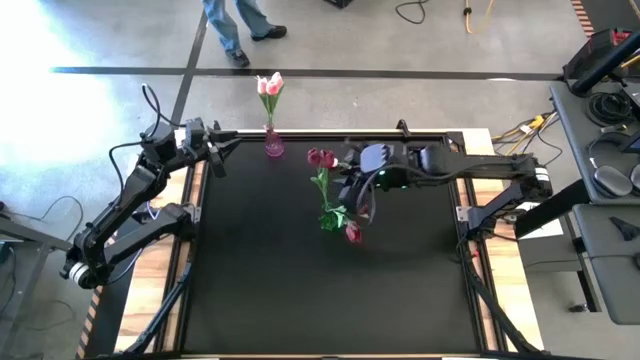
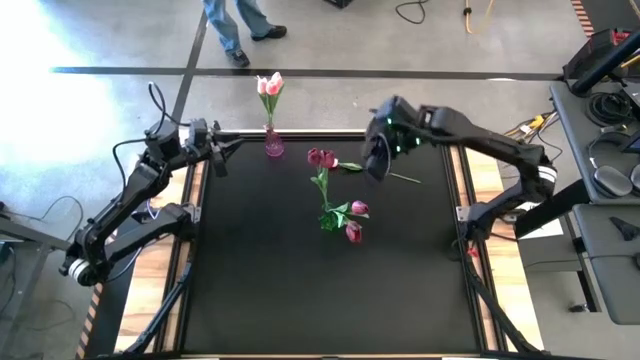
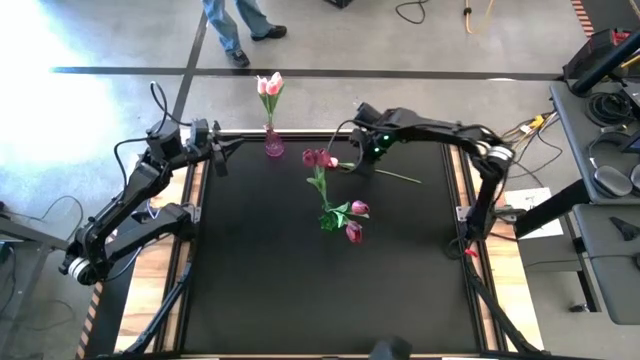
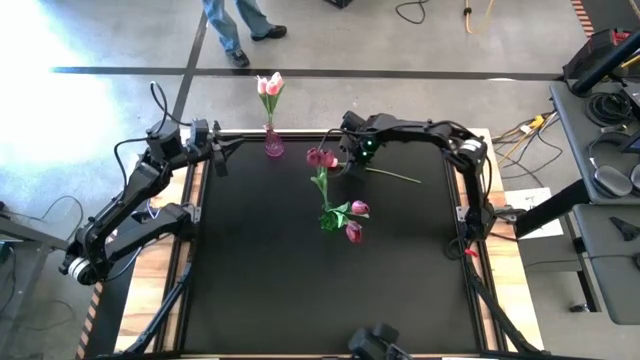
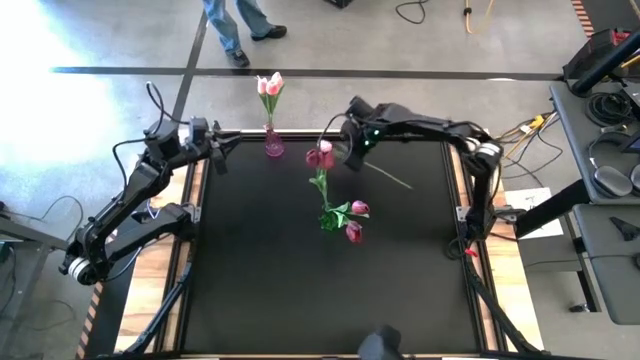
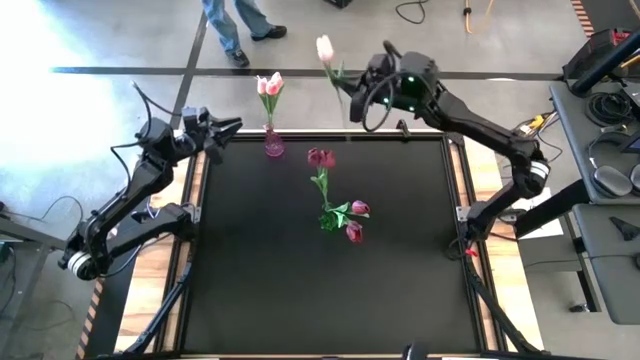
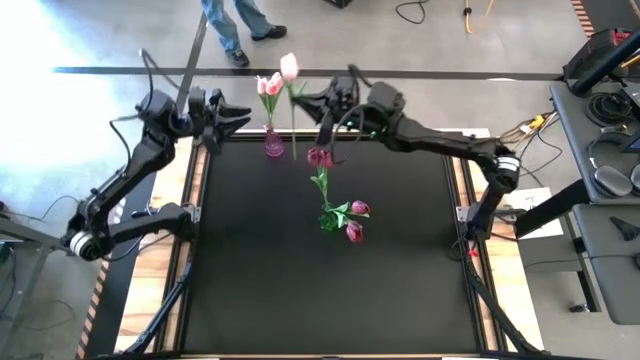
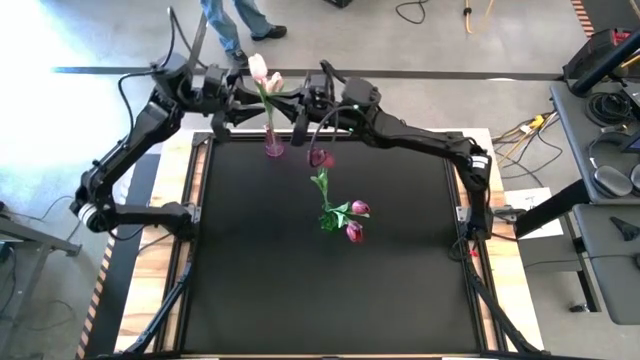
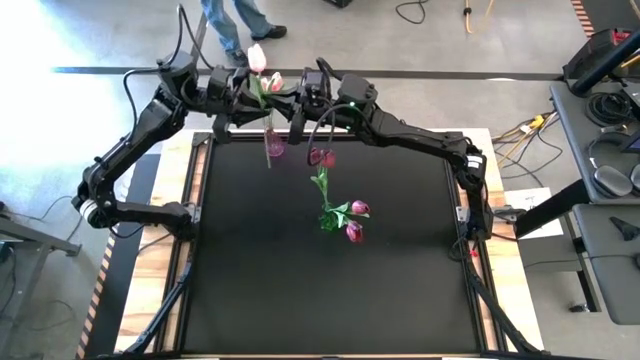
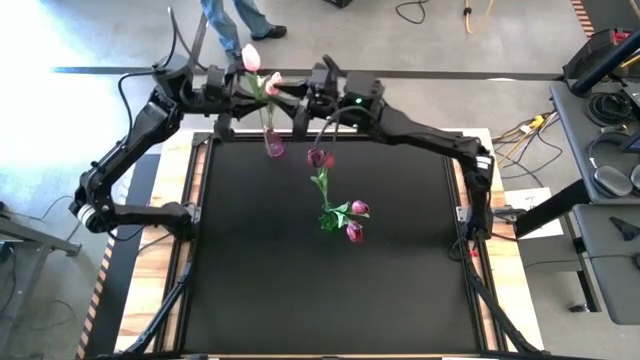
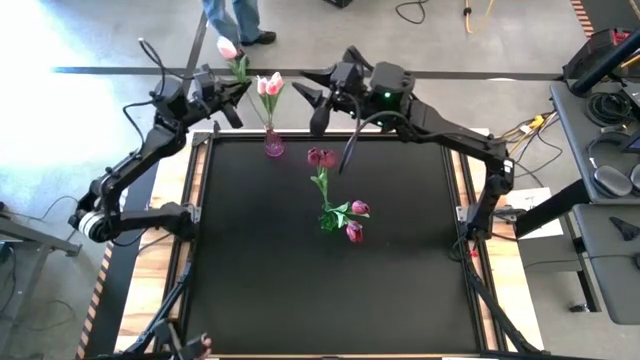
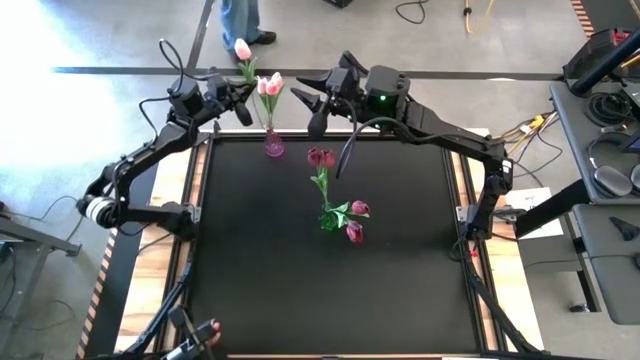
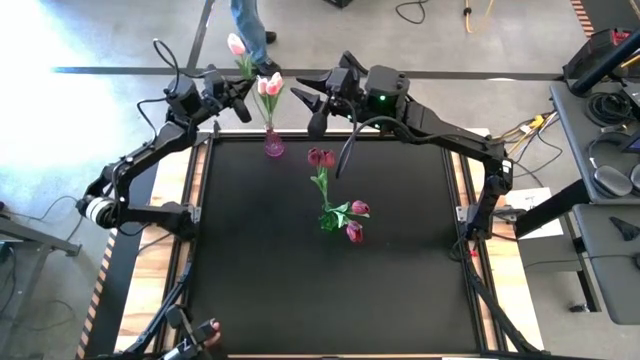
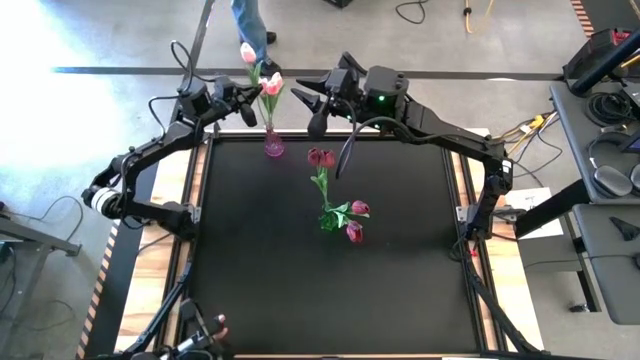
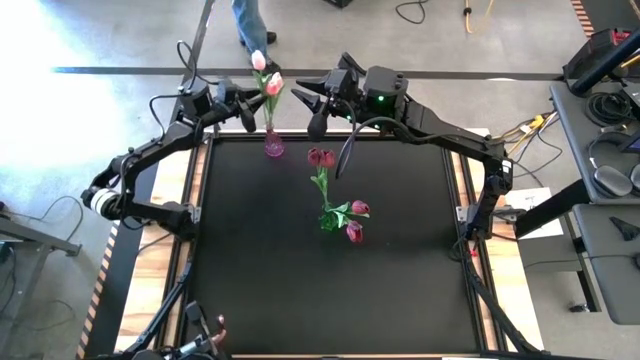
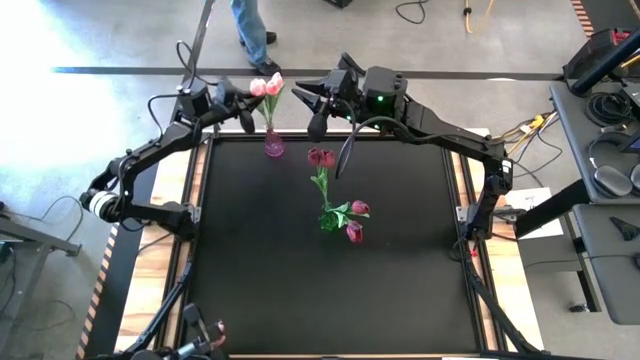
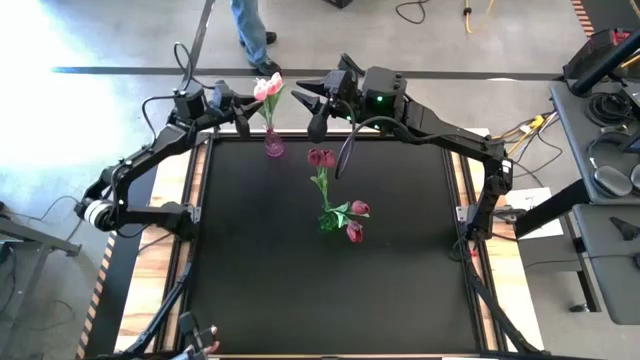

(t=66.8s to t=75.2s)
Task: Sort flowers into vase by color
Put the pink flower into the violet vase

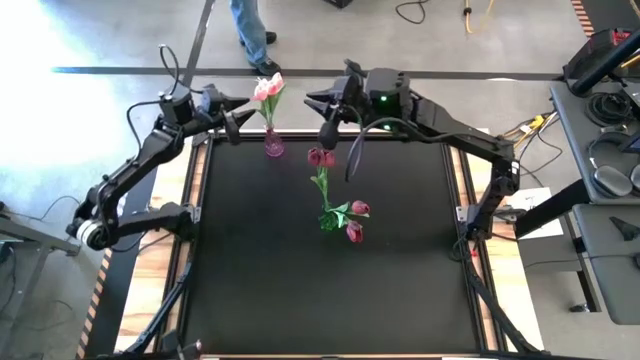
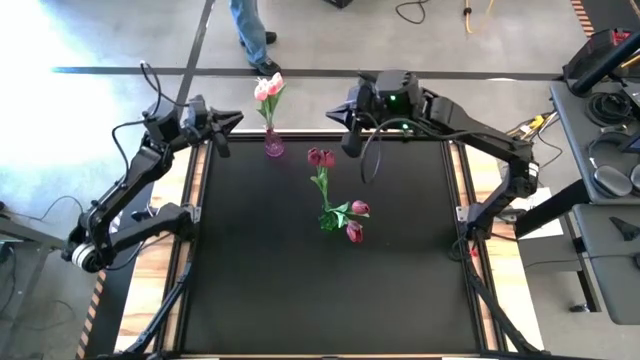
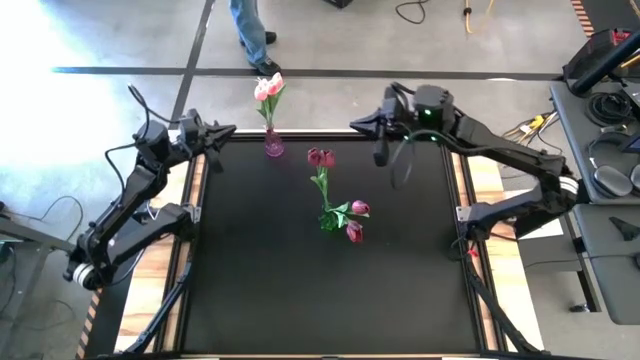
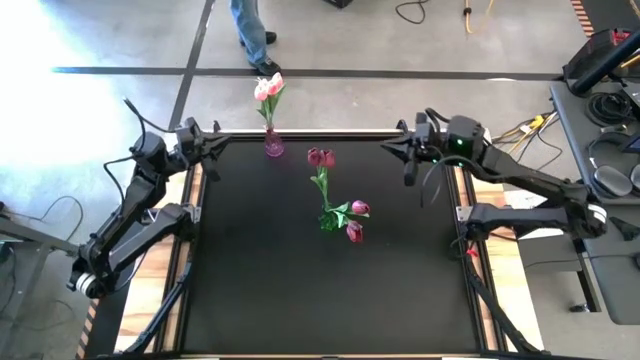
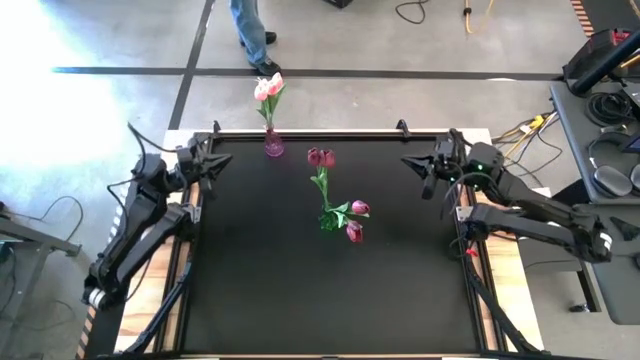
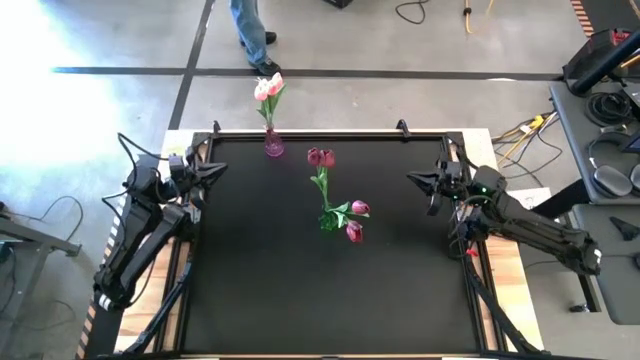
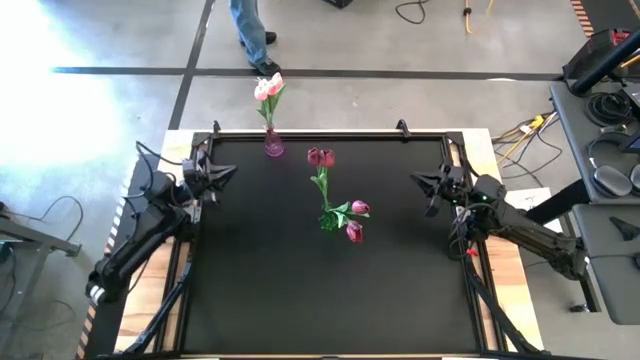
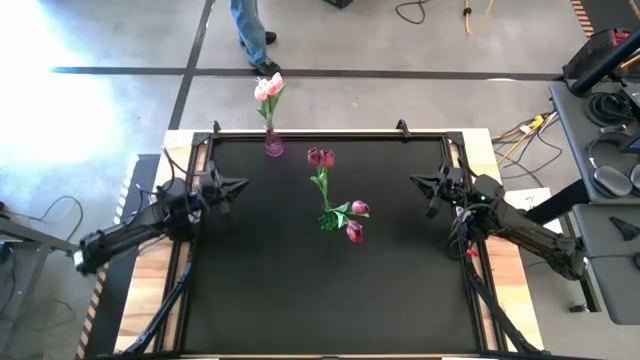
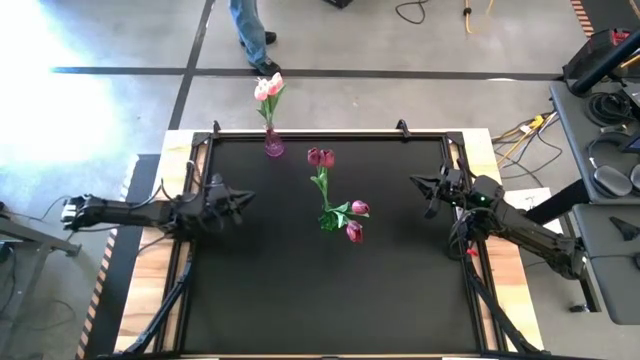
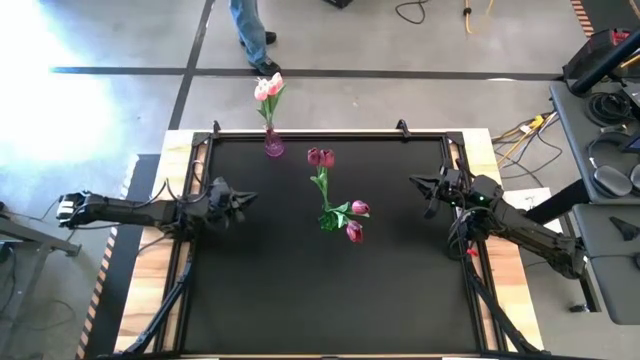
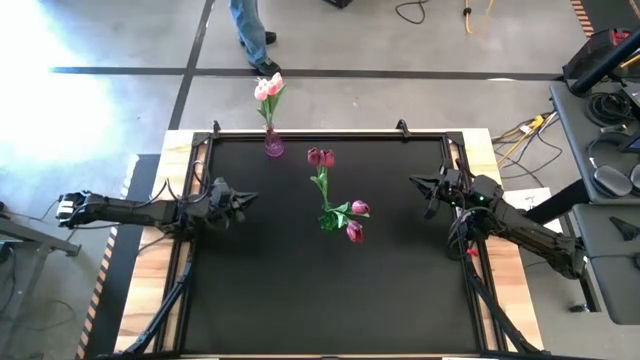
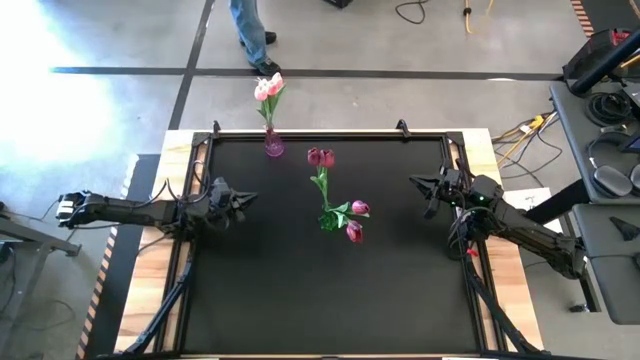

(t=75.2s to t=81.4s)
Return to Home Position

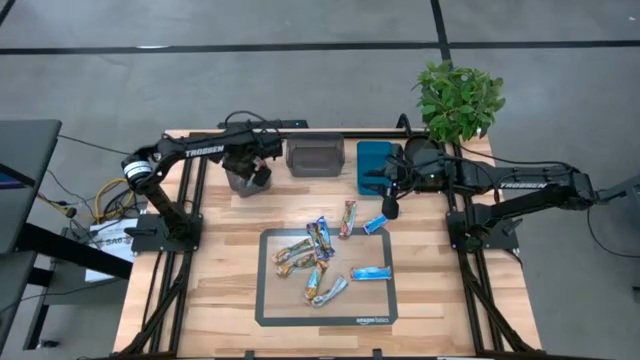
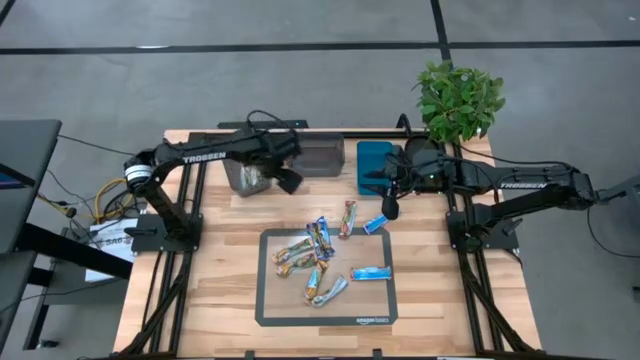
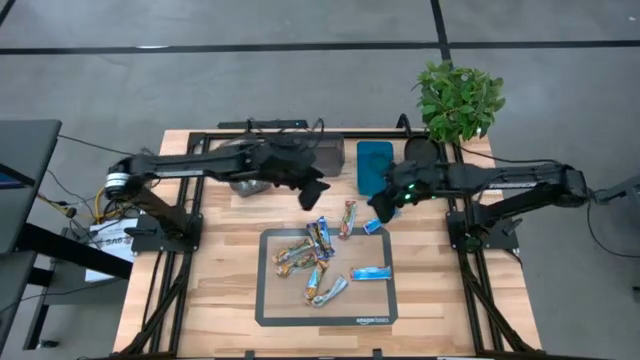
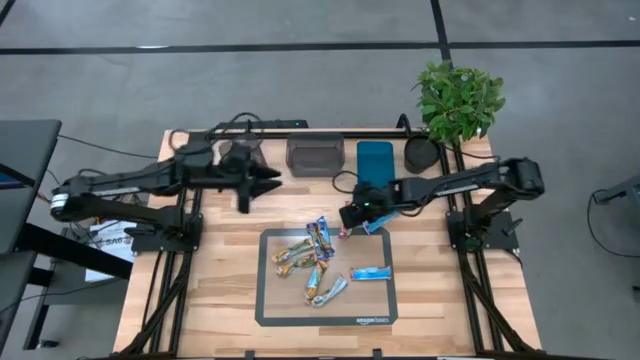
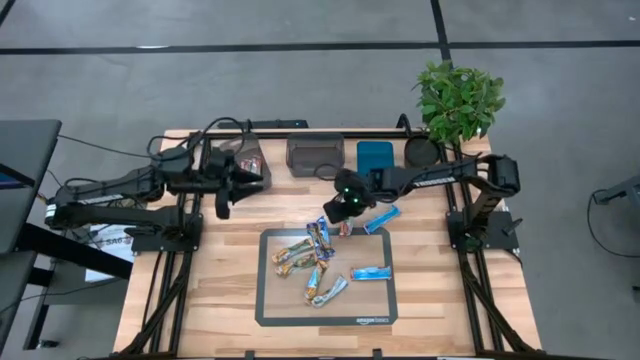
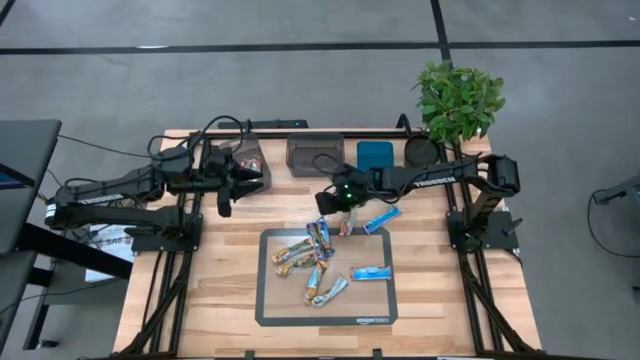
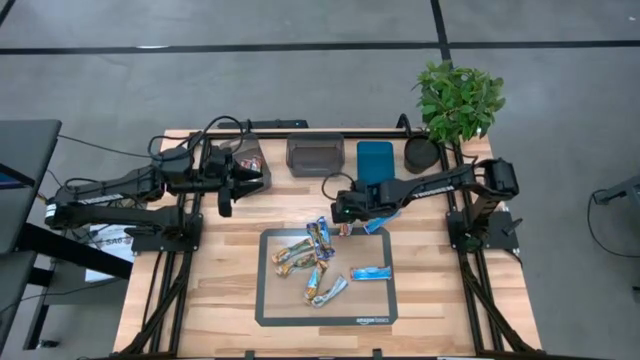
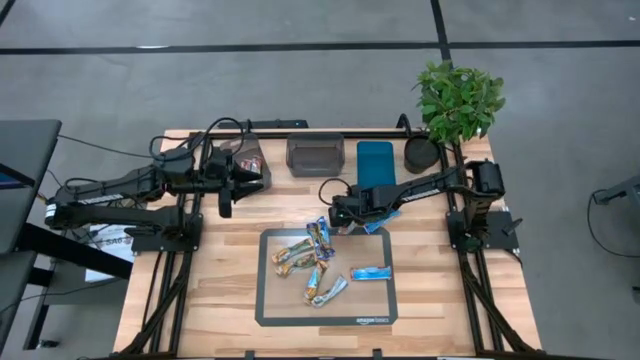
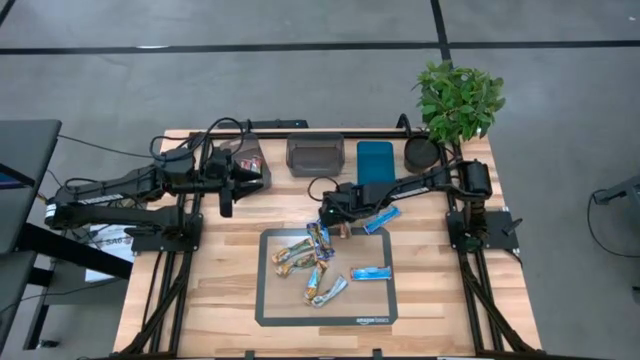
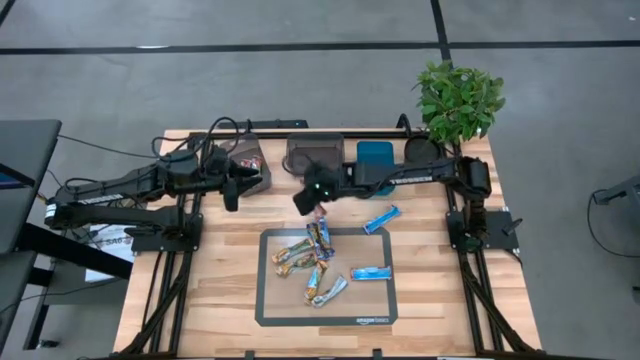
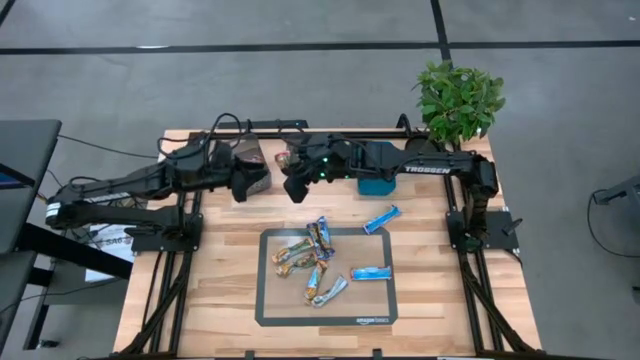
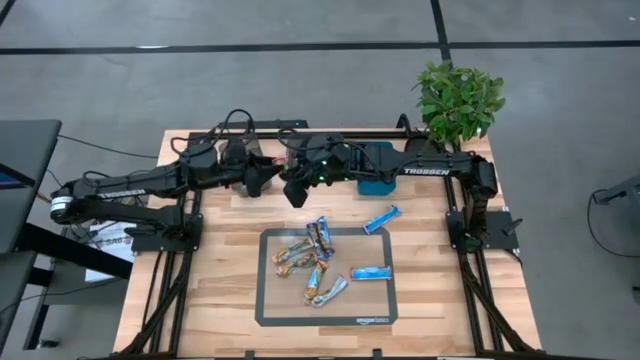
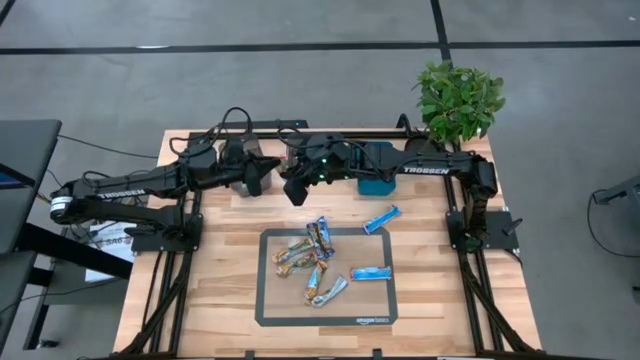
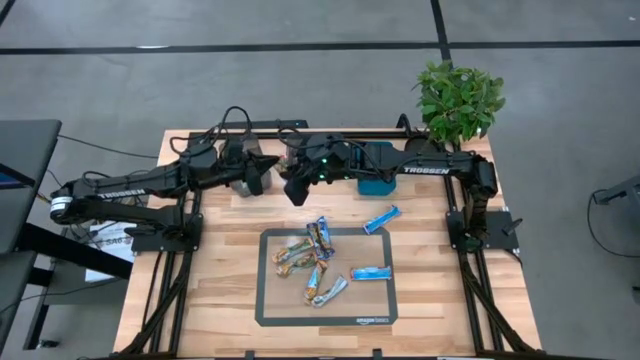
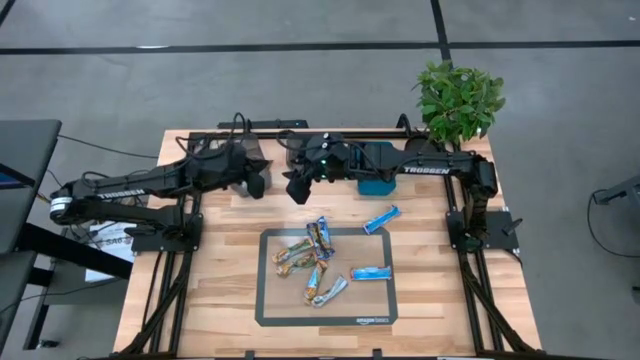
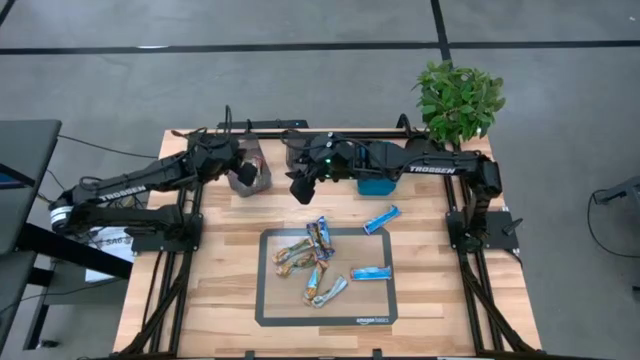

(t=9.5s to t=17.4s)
Task: Pick and place Granola Bars by type
Put the red granola bar into the left black bin
